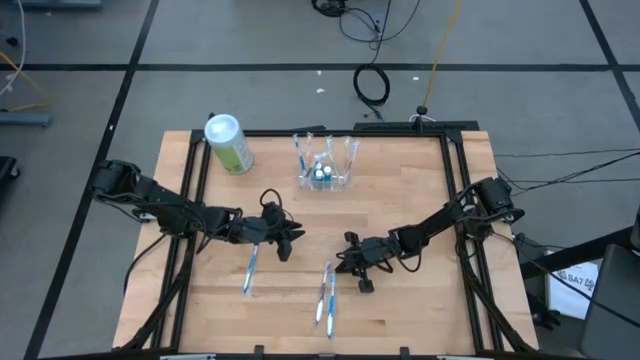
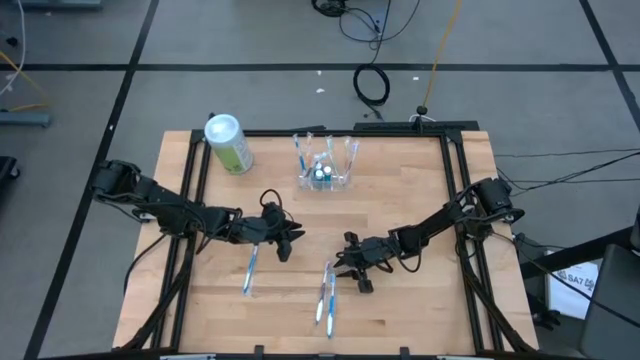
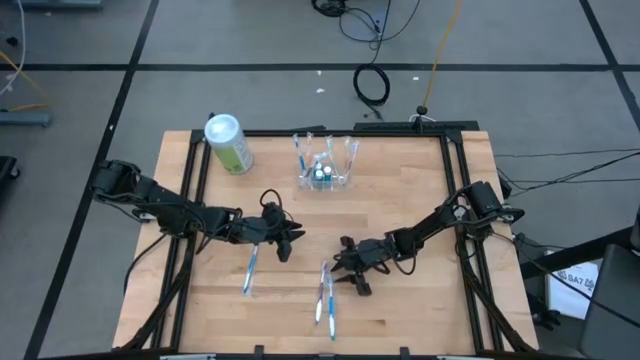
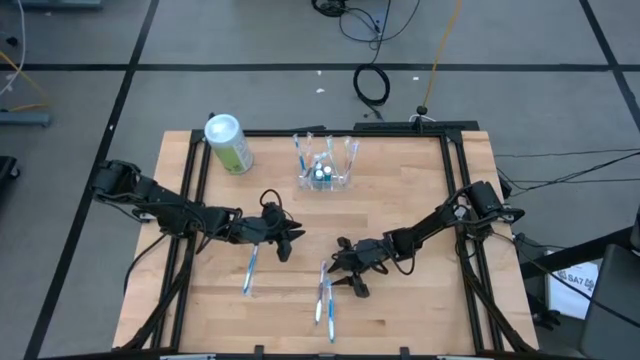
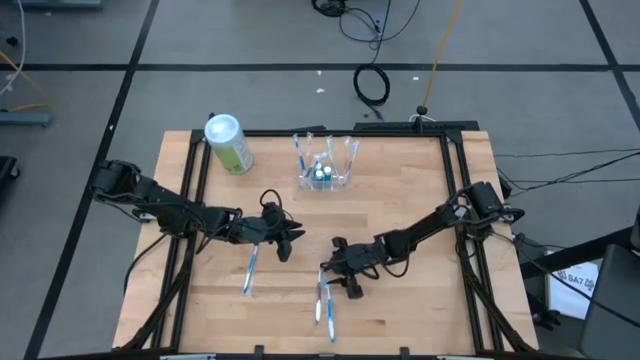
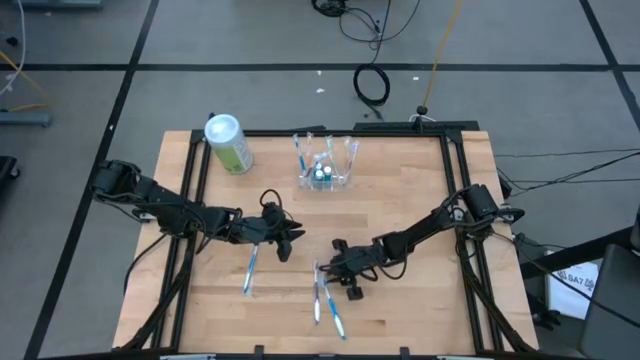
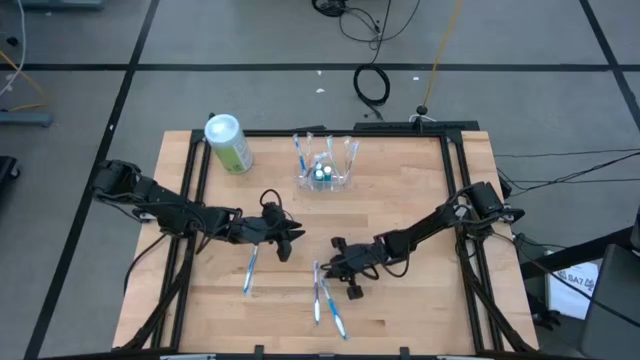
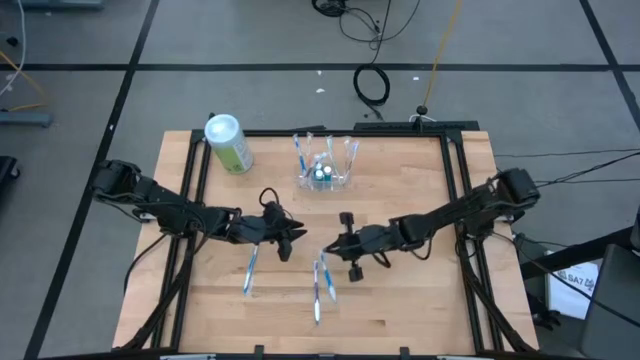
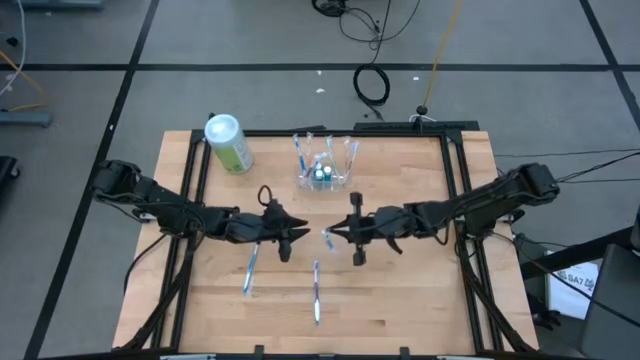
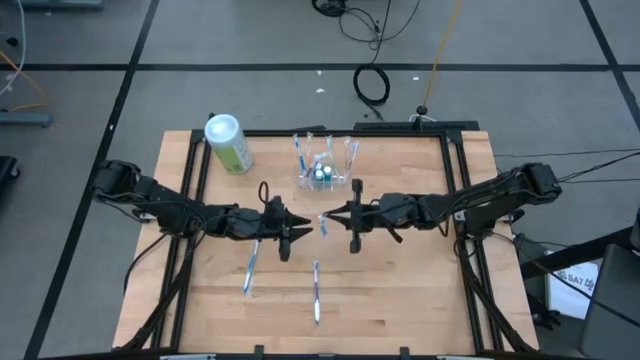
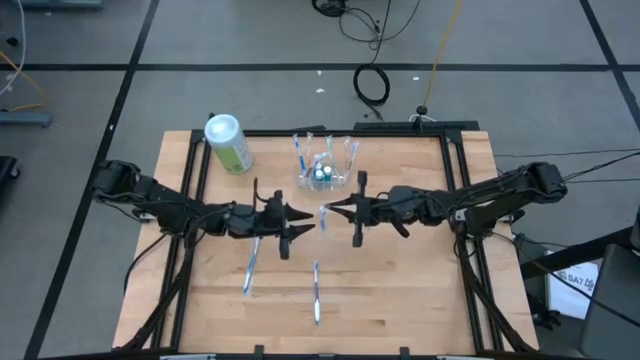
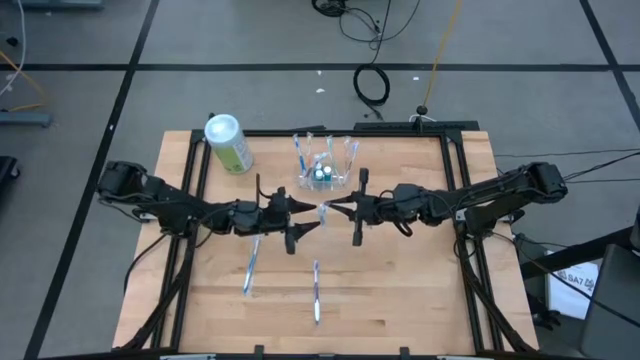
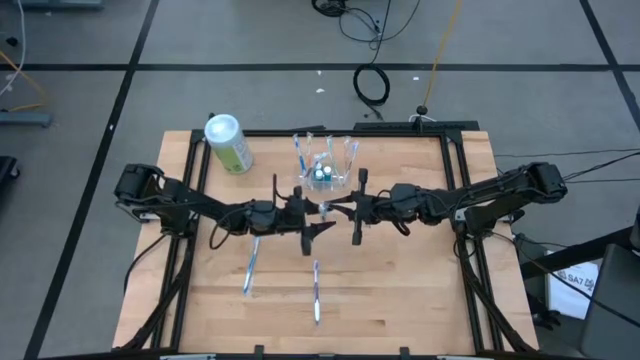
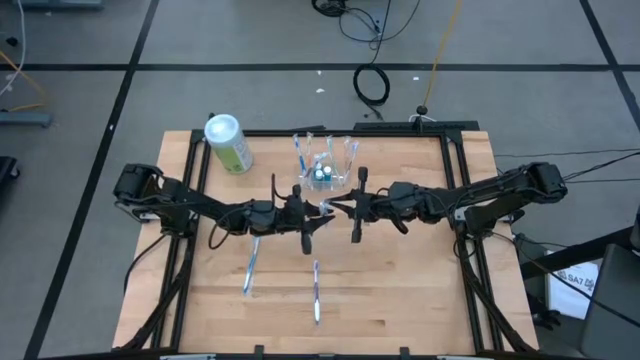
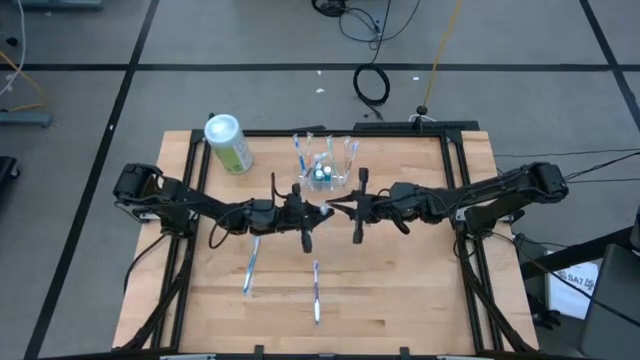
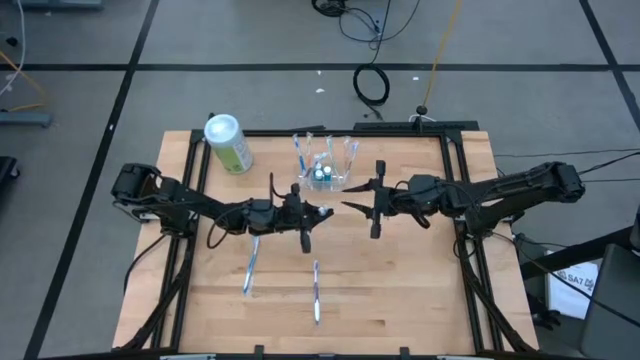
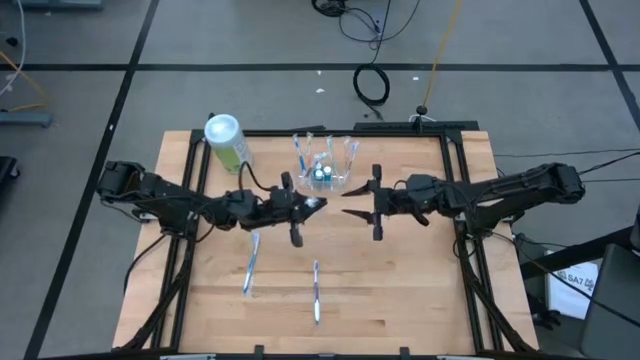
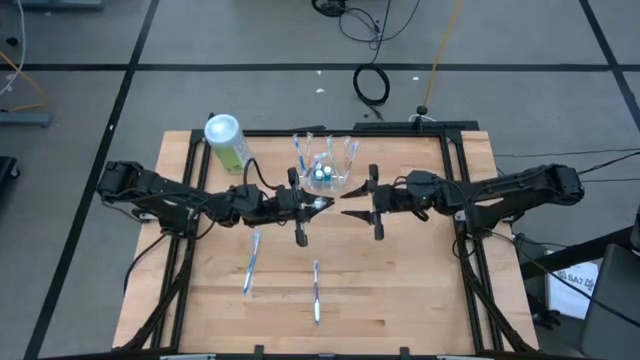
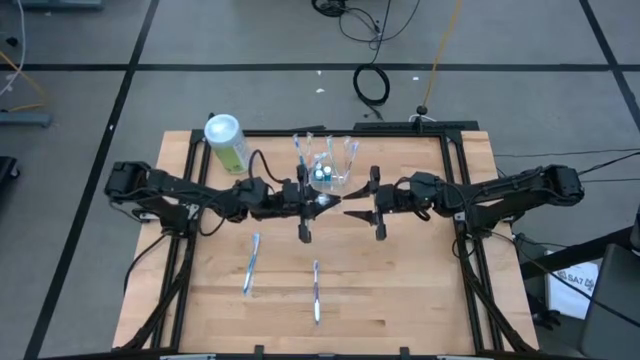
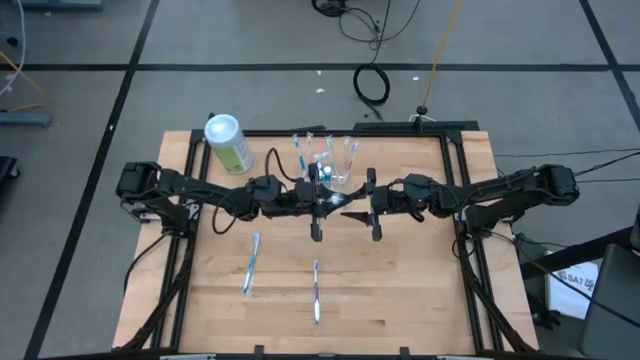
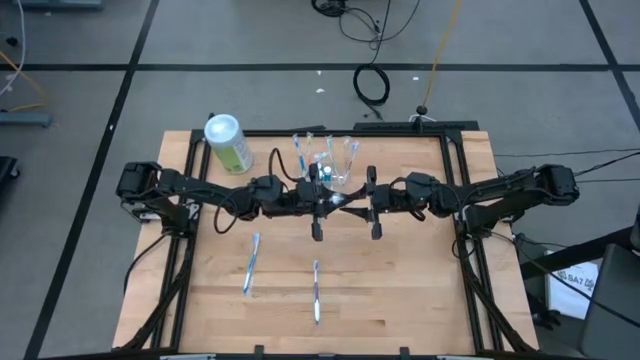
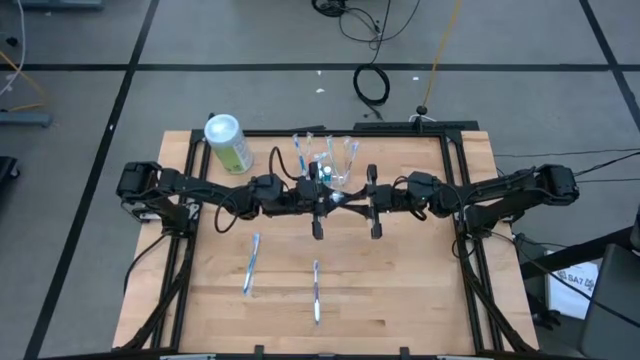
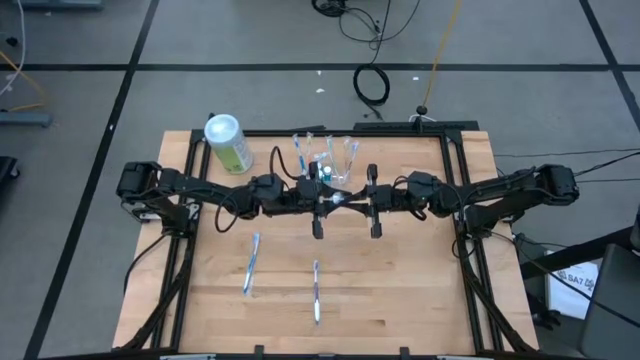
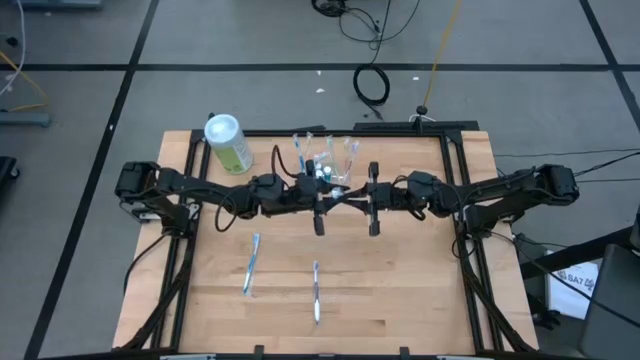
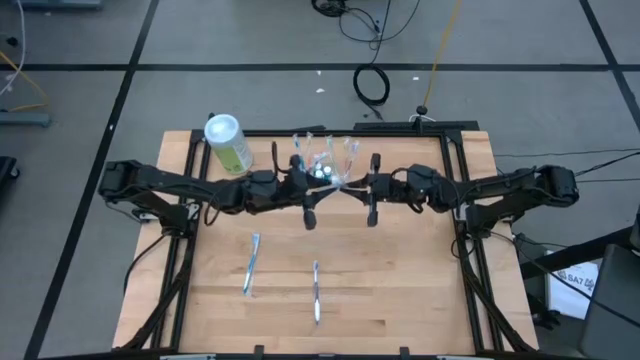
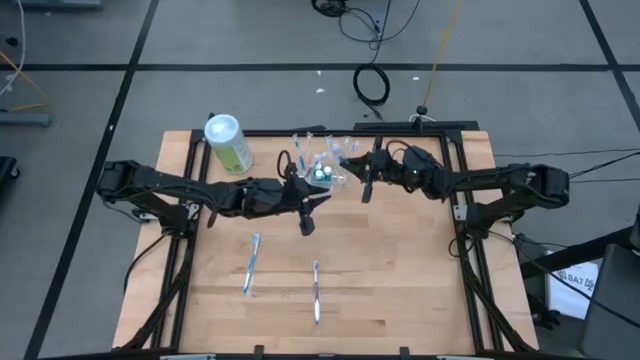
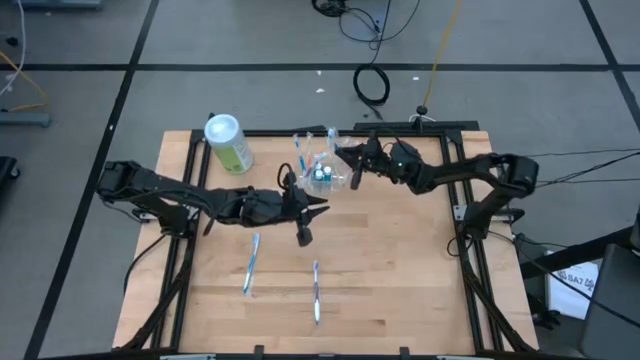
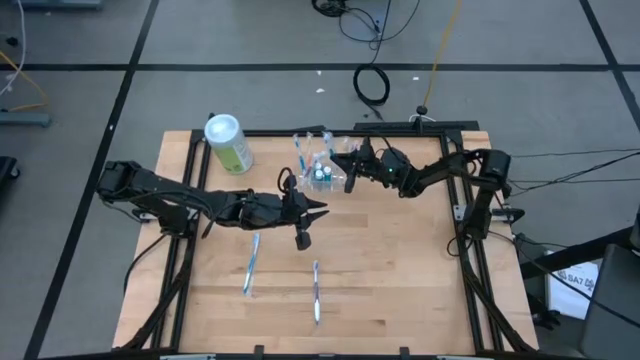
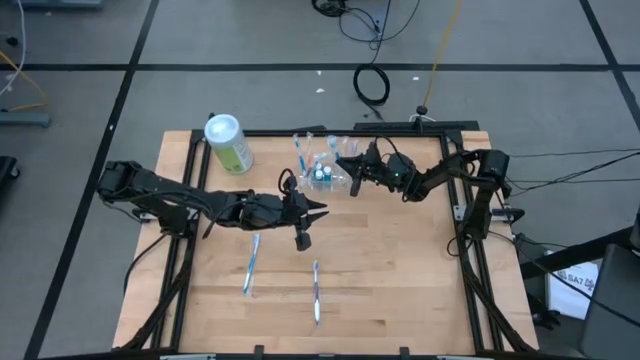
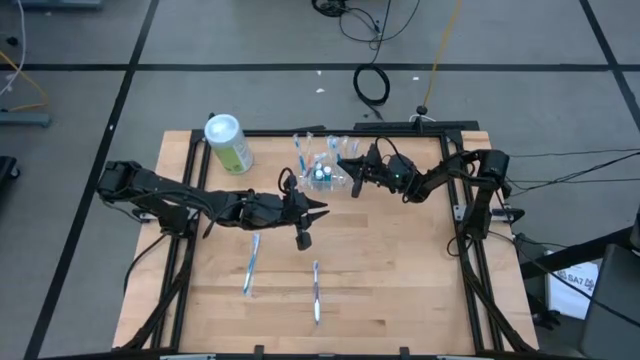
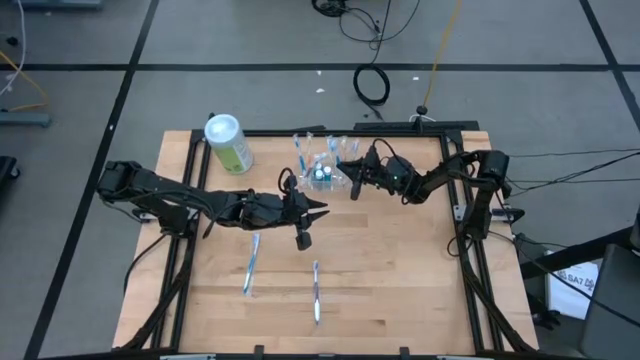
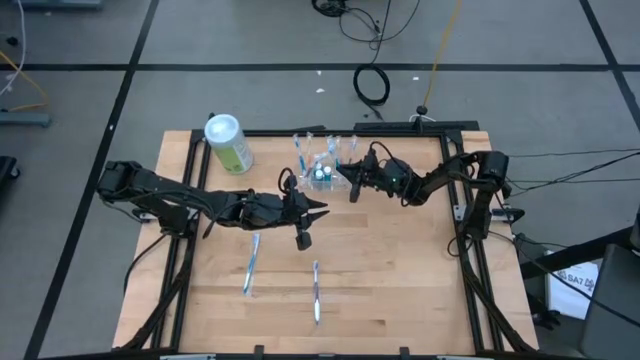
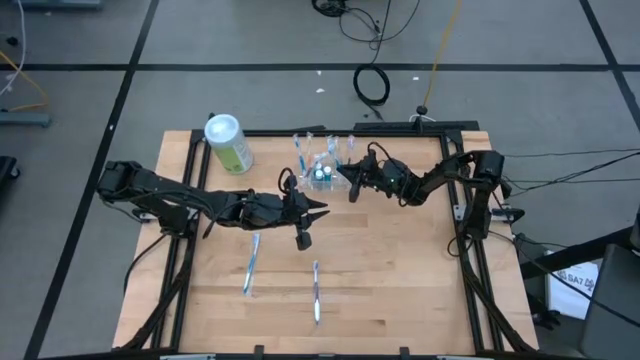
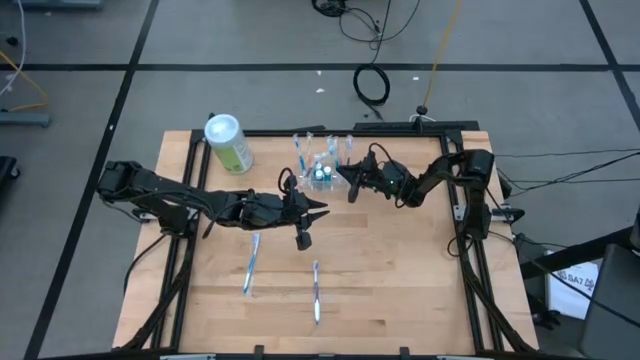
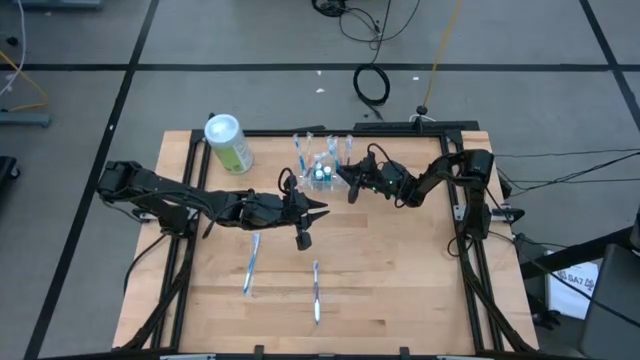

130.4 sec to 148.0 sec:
Task: Pick & Place toothbrushing station
Put the right blue toothbrush into the transparent organizer

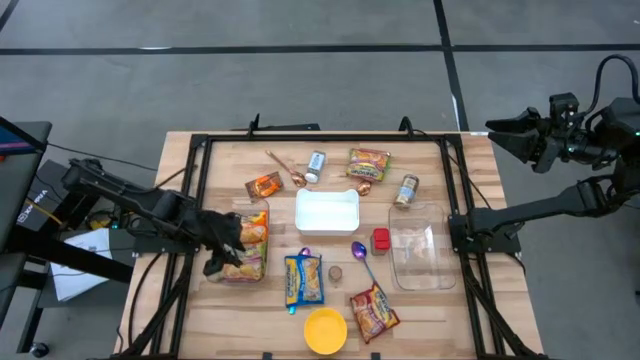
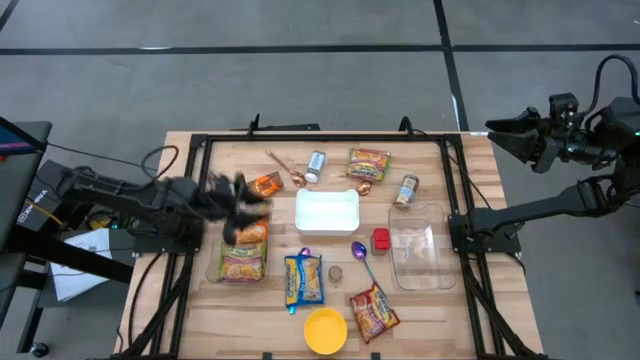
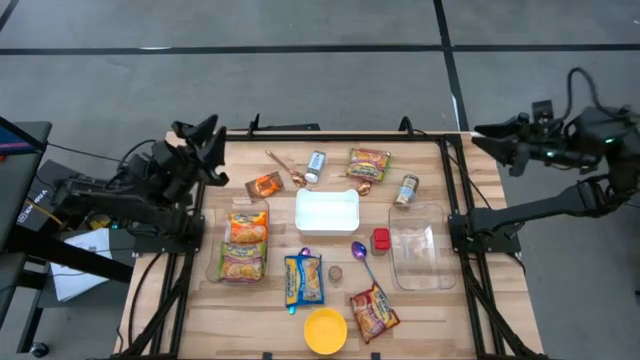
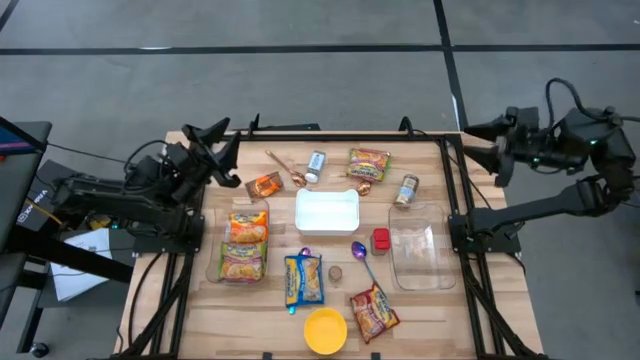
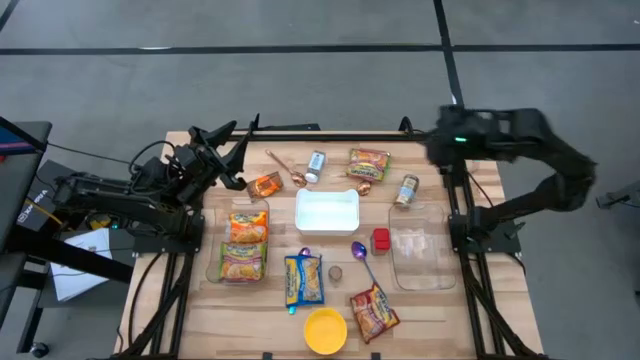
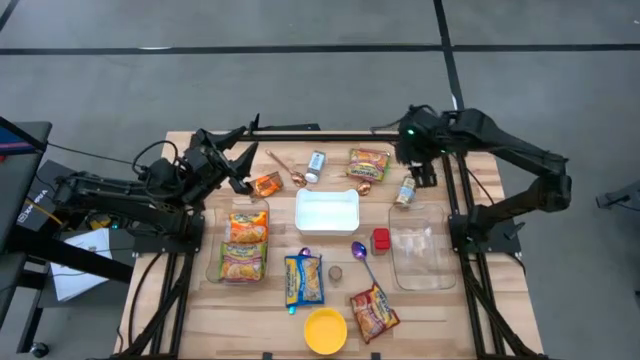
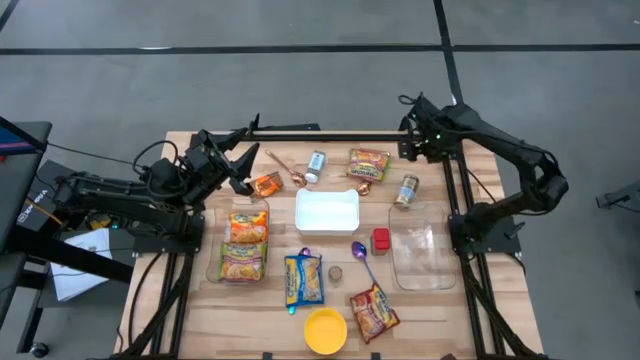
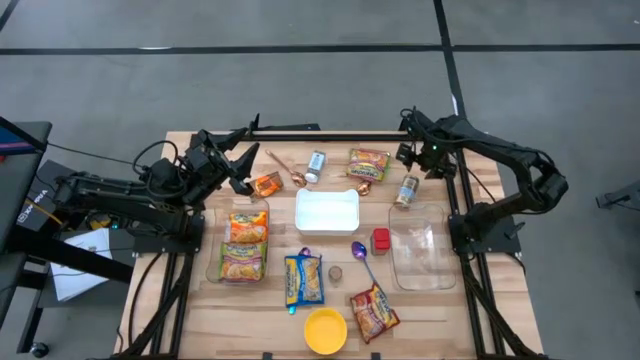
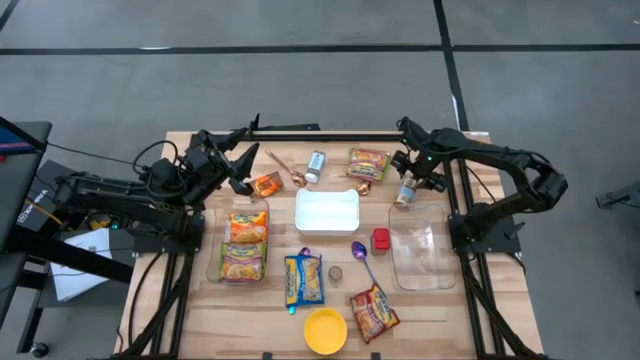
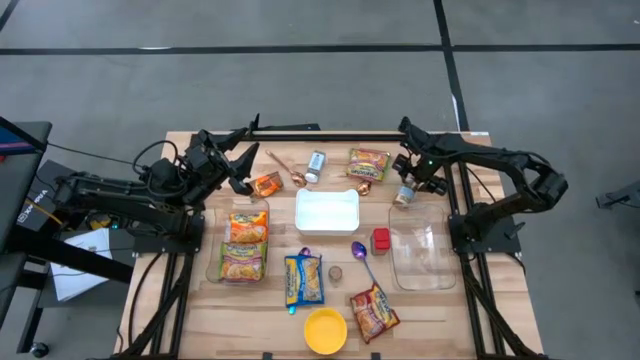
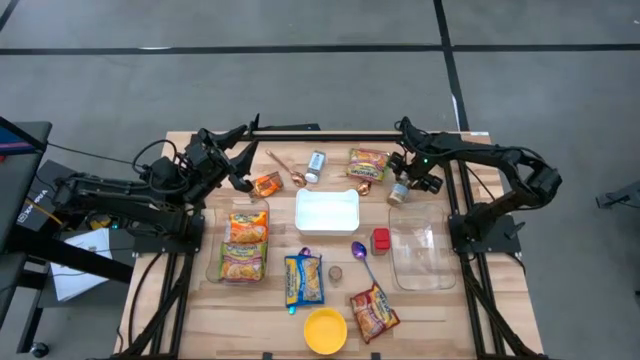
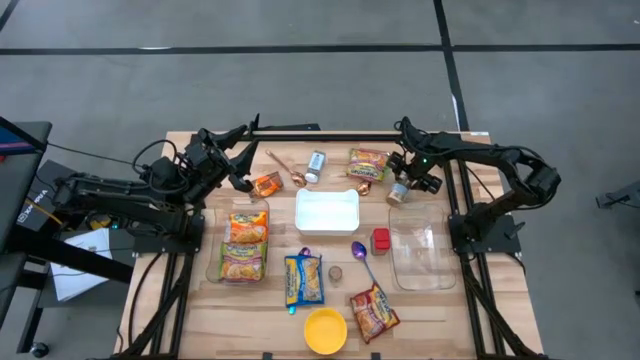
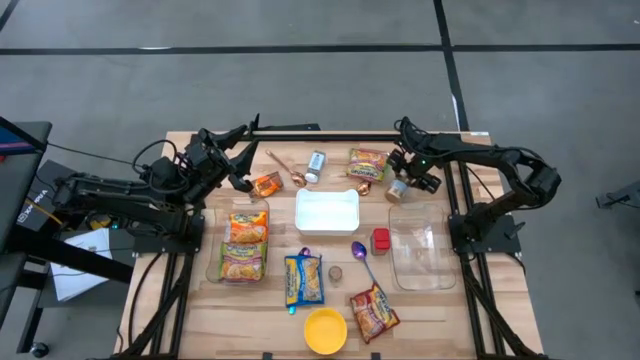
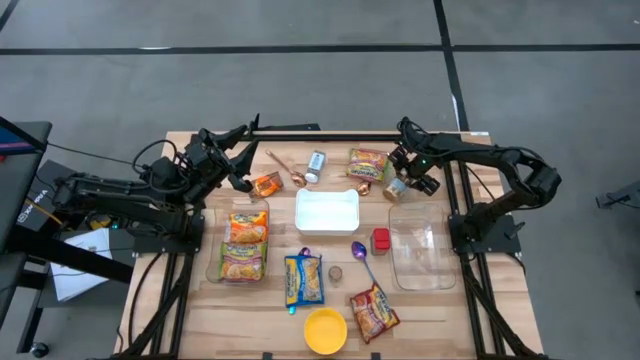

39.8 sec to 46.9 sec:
Task: Pick & Place Food Item
Put the gold seasoning bottle into the right transparent bin
